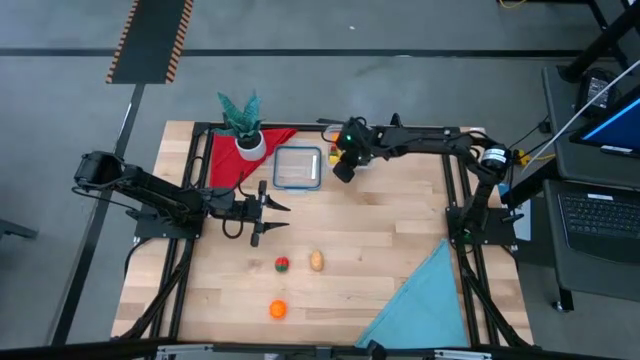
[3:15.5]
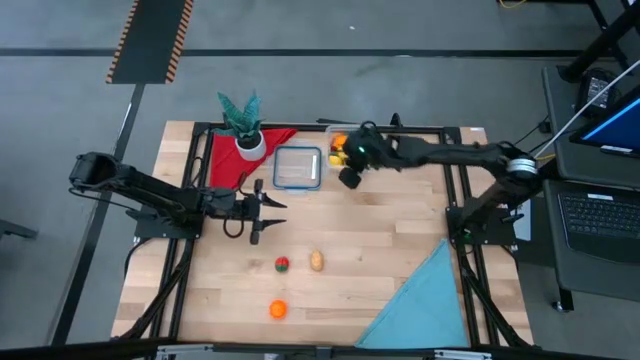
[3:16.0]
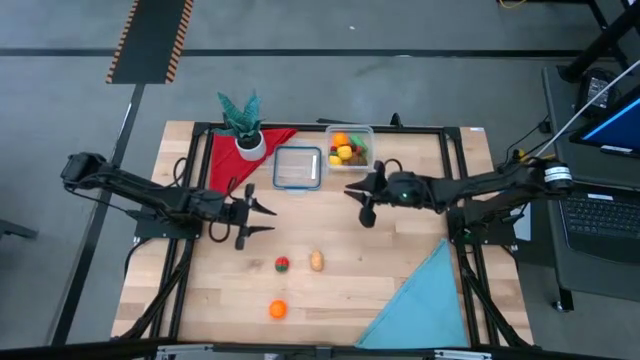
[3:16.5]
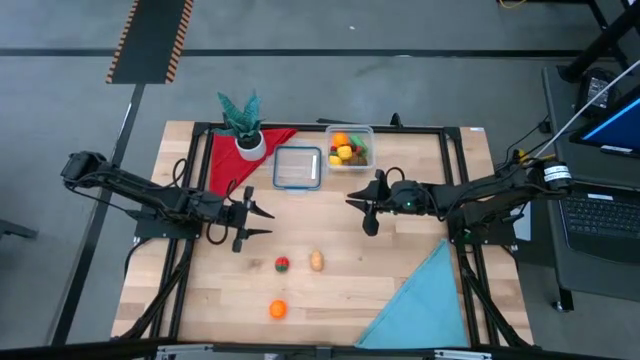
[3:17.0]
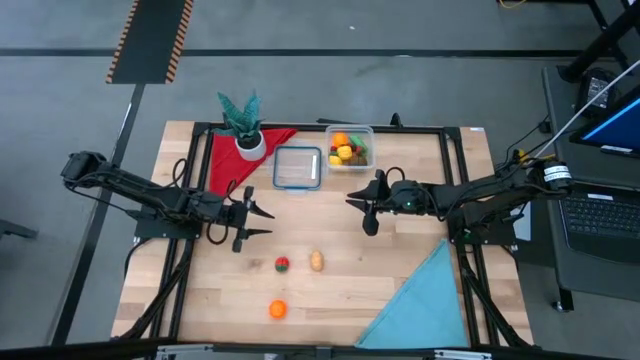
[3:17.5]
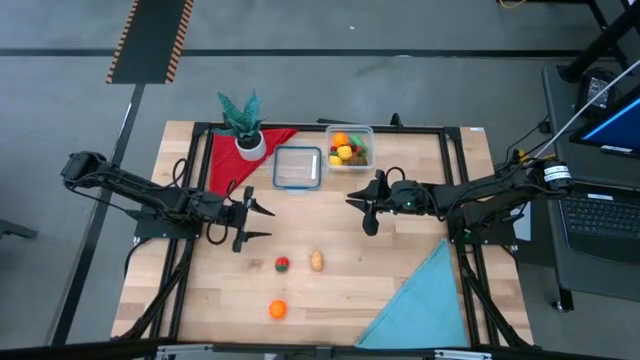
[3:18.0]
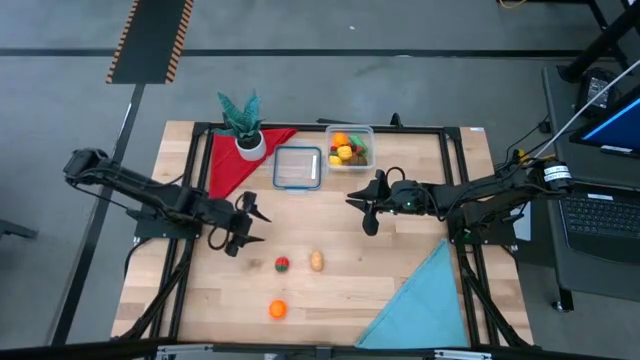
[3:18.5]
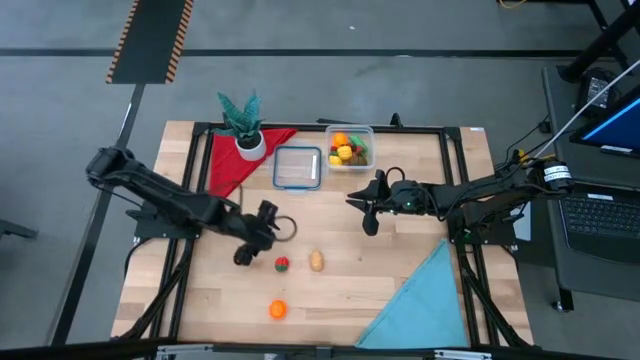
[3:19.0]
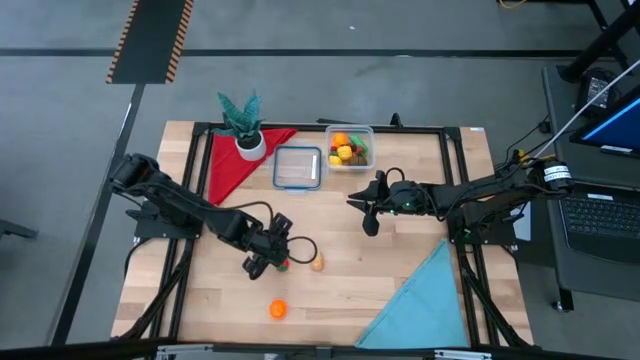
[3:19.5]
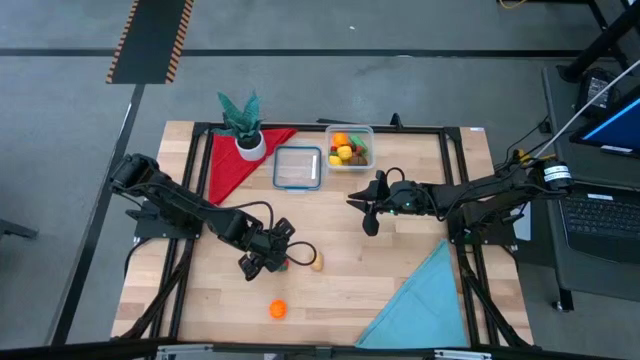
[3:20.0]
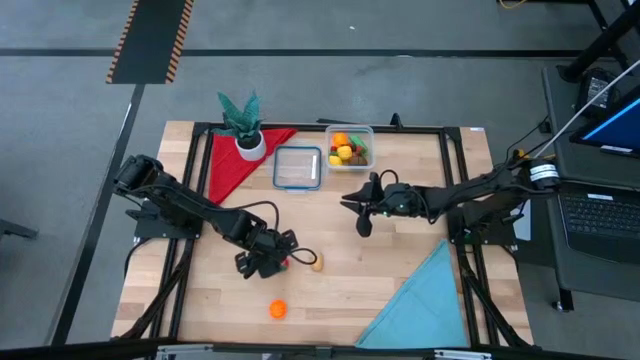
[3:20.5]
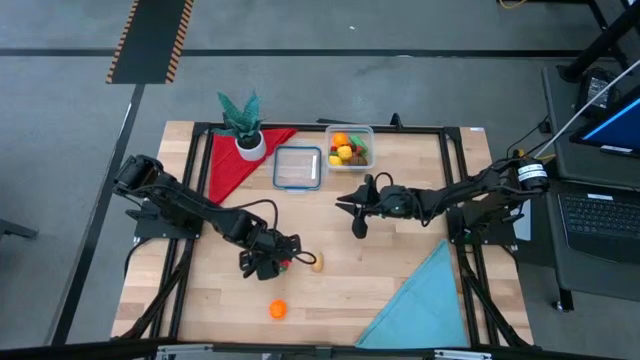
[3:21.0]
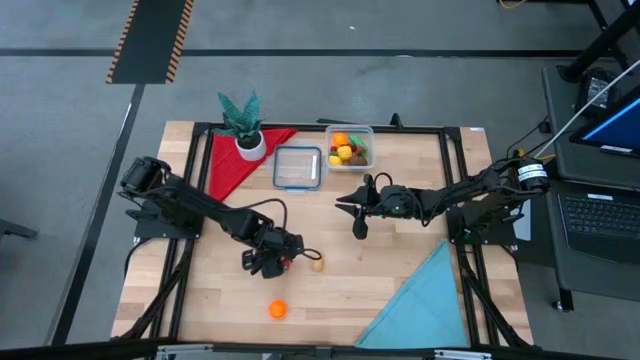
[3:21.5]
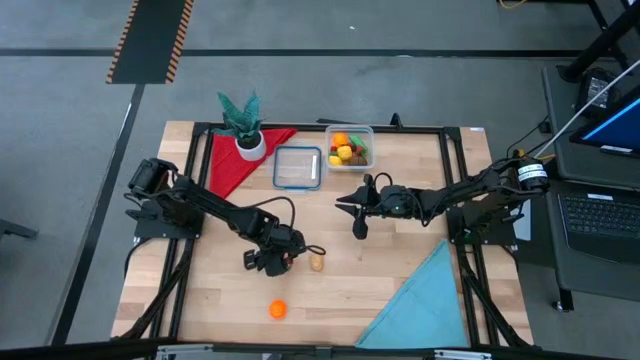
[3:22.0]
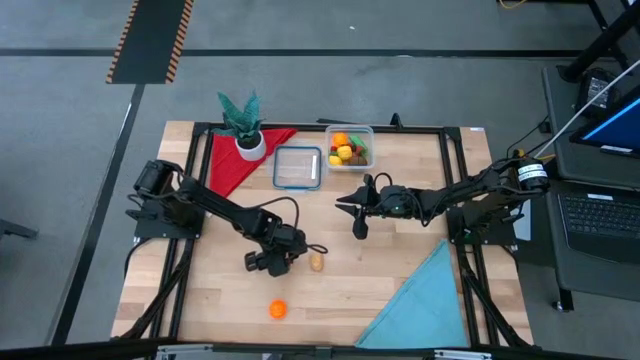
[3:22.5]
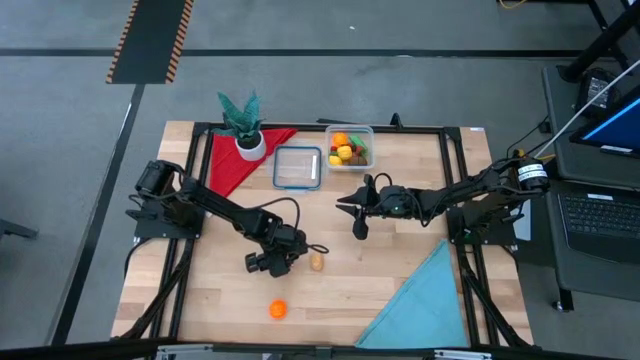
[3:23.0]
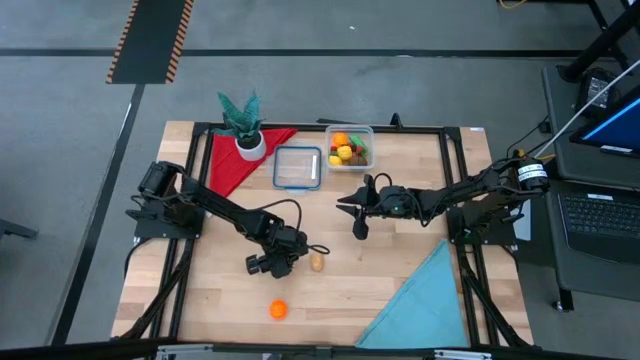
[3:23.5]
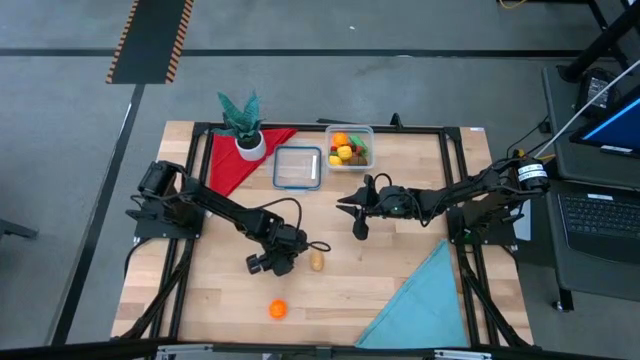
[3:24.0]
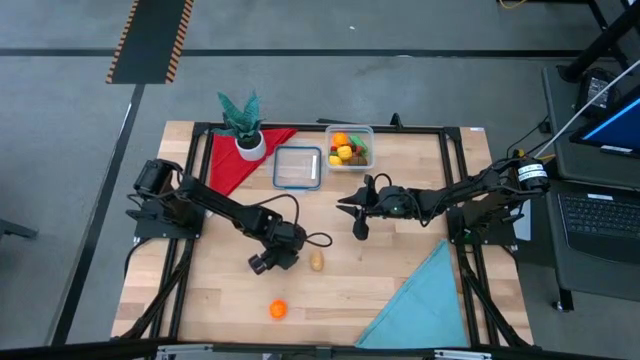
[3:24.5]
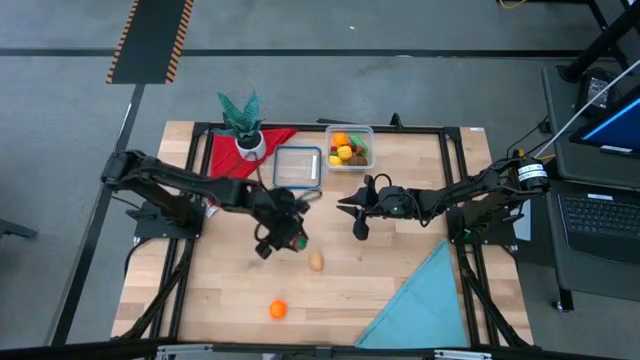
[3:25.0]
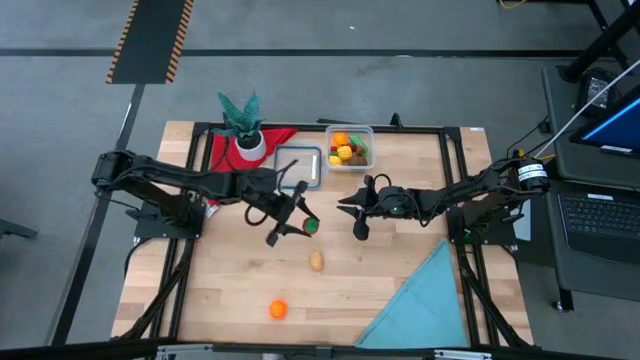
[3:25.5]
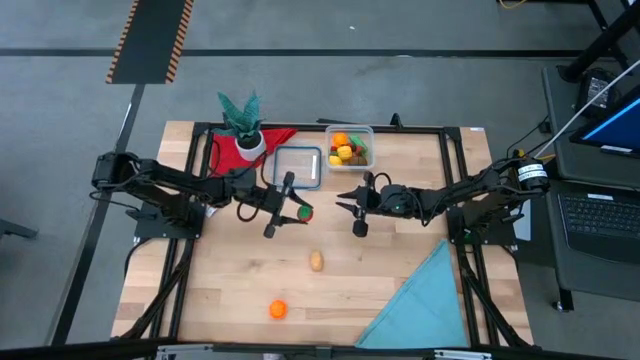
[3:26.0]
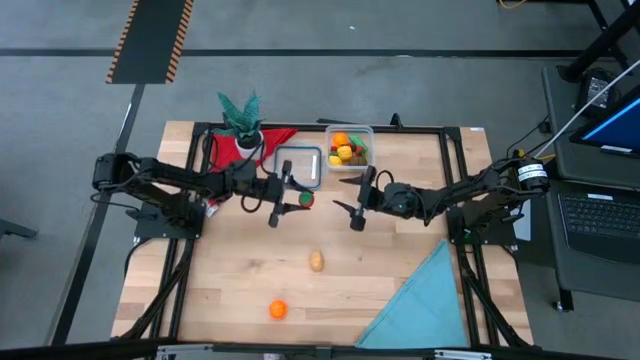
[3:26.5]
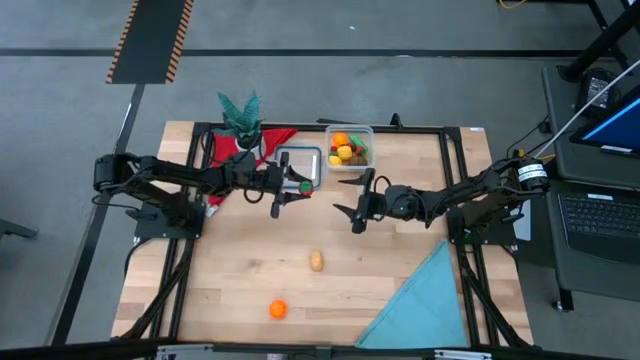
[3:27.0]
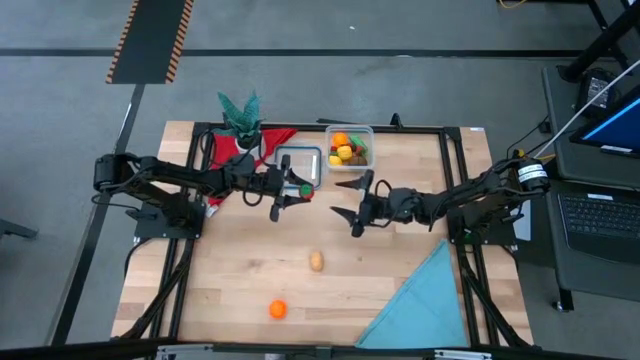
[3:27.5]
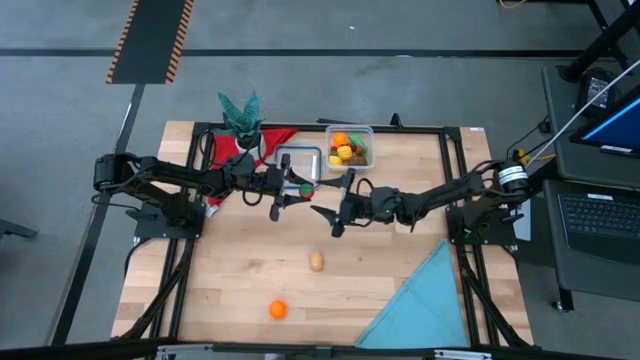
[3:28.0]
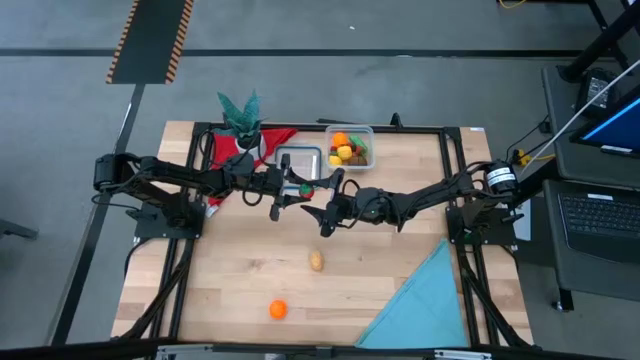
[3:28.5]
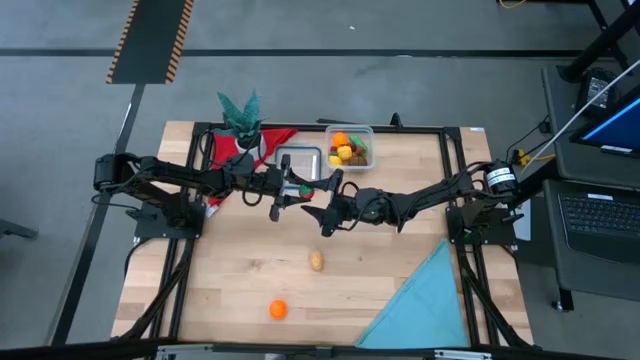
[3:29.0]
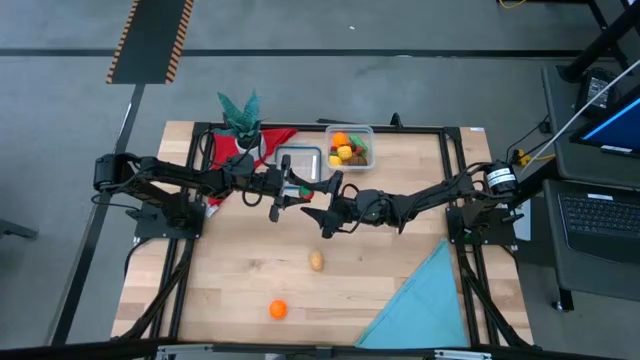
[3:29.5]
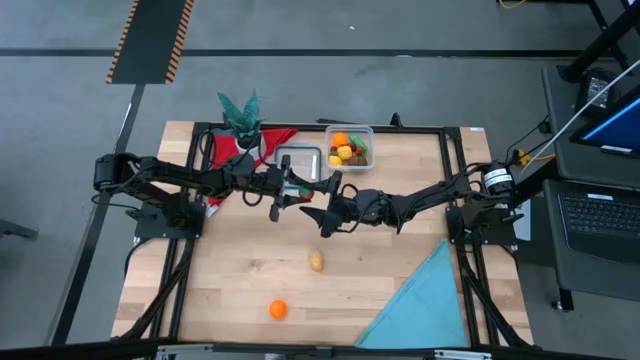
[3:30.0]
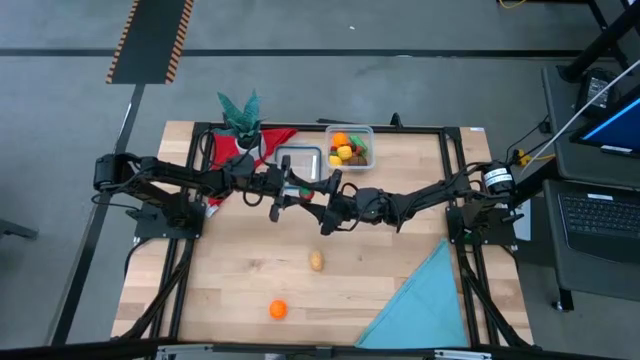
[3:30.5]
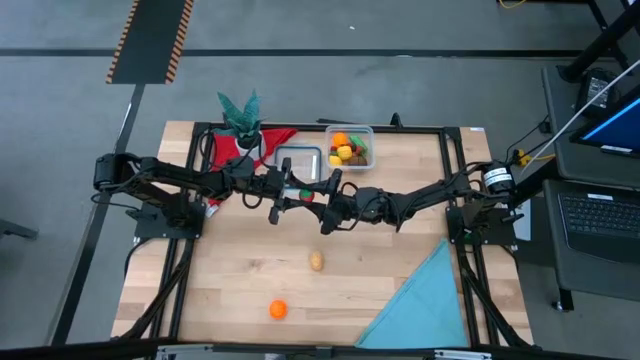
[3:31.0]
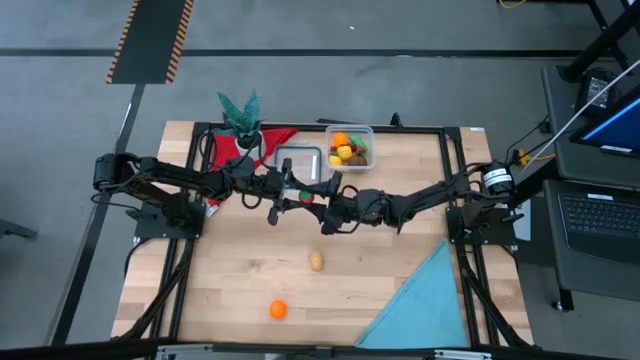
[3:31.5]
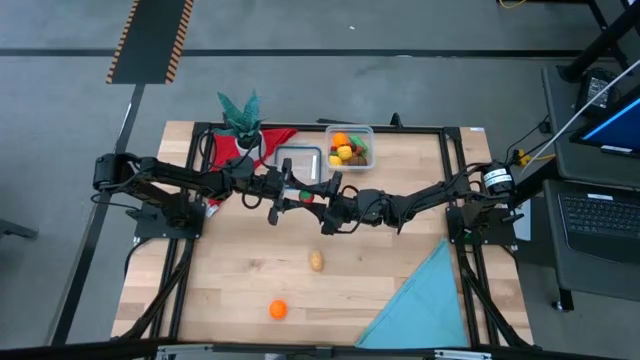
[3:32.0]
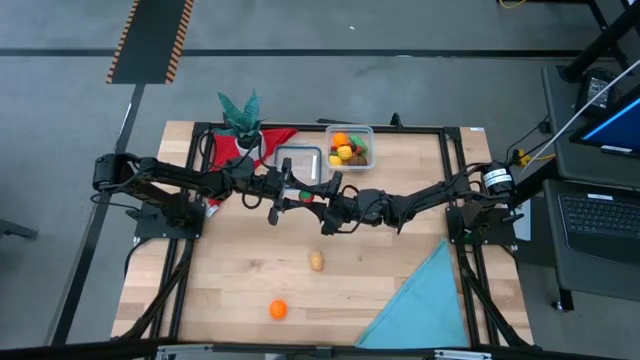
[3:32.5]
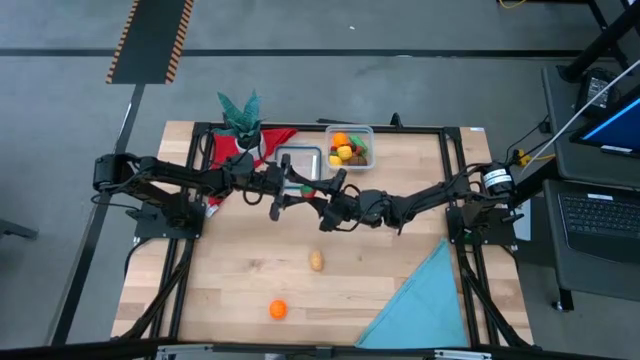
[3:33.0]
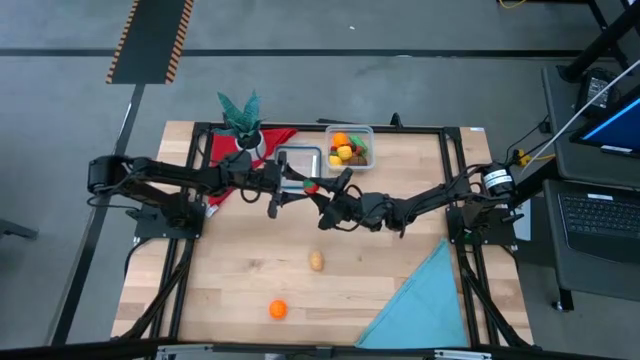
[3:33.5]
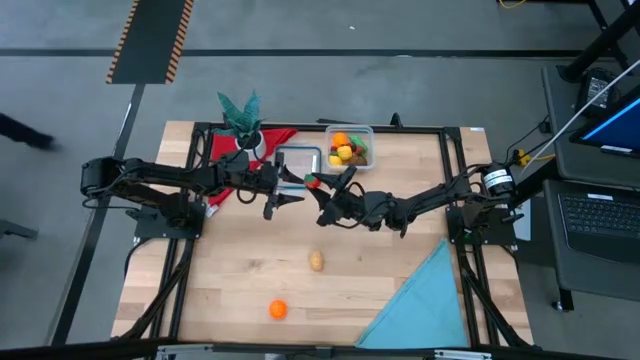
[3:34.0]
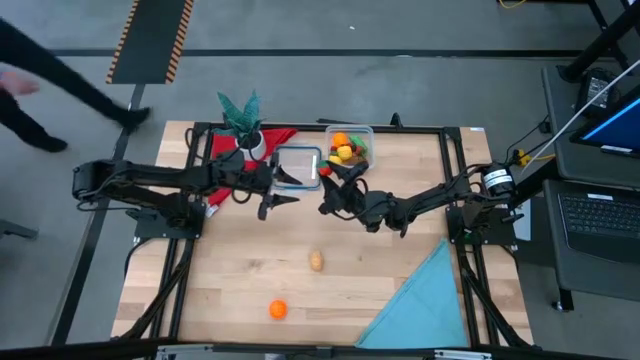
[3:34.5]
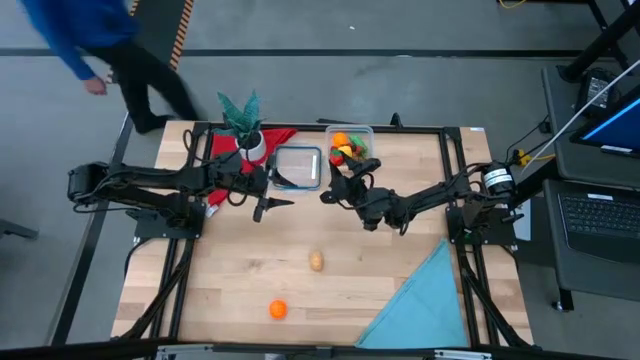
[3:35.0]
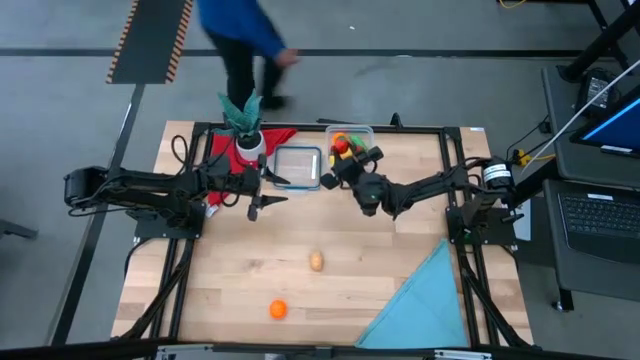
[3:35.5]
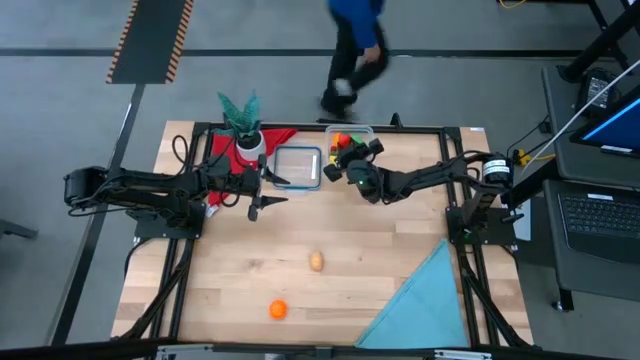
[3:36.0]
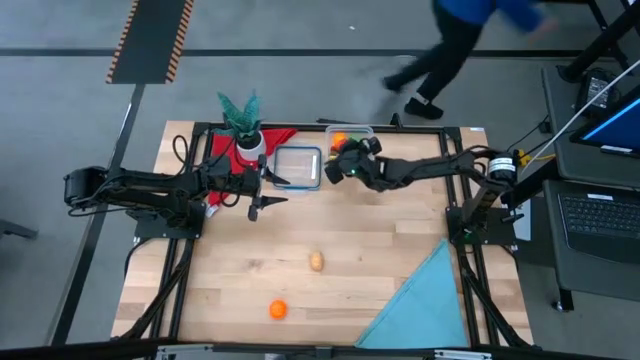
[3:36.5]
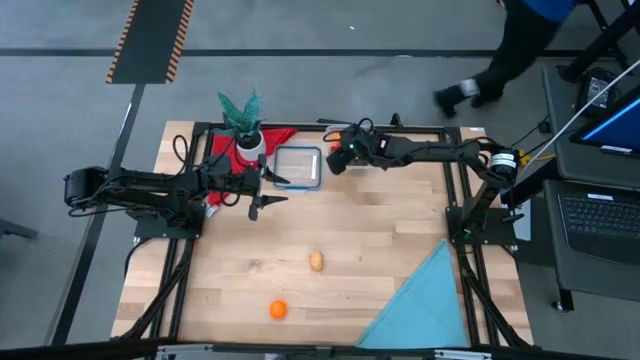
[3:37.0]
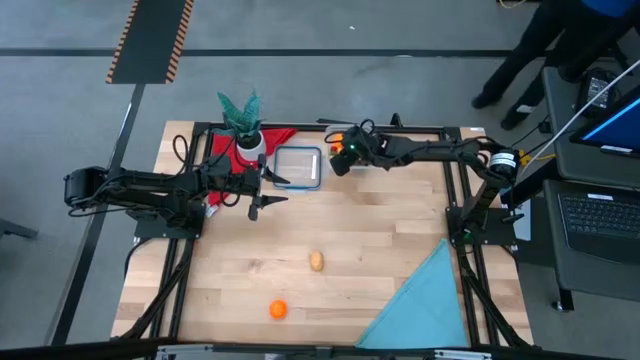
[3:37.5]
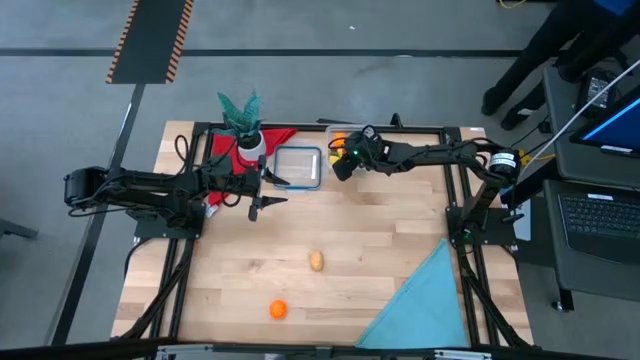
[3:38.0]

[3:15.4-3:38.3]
Task: Pick and placing Produce into tupperware
Put the strawberry into the transparent bin
